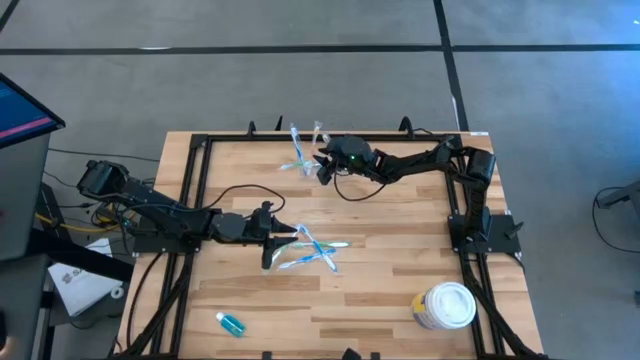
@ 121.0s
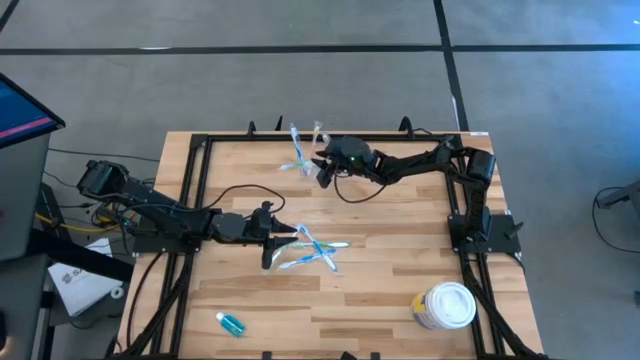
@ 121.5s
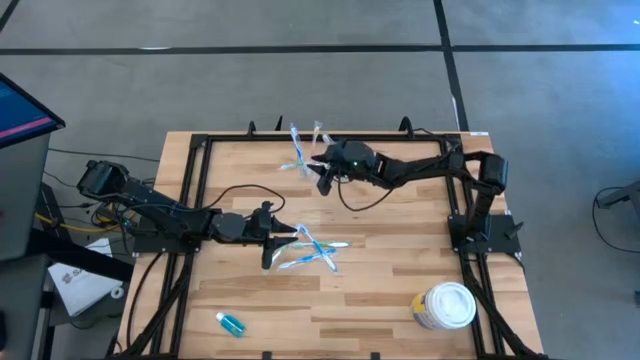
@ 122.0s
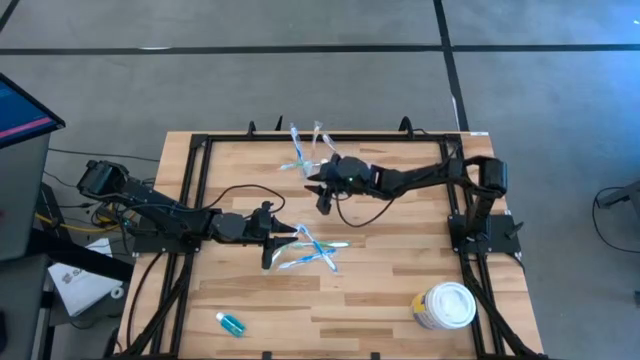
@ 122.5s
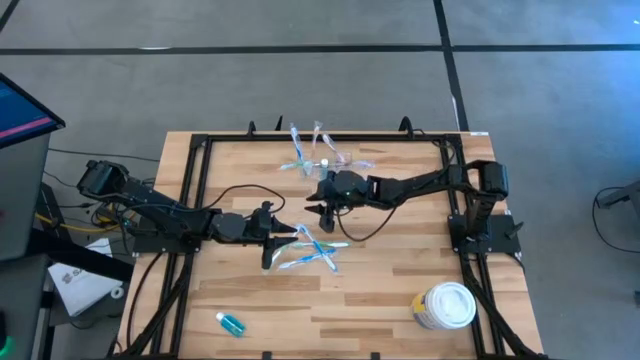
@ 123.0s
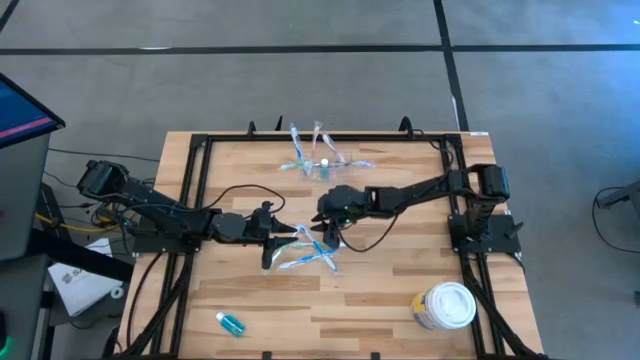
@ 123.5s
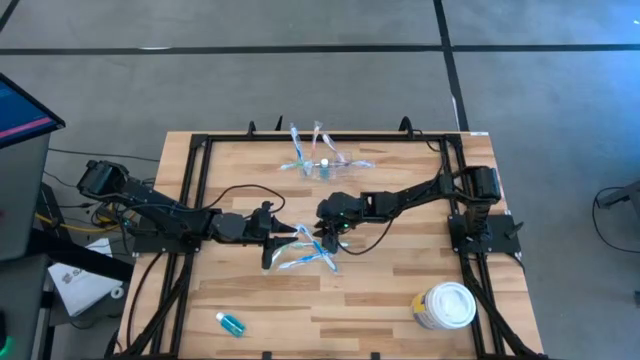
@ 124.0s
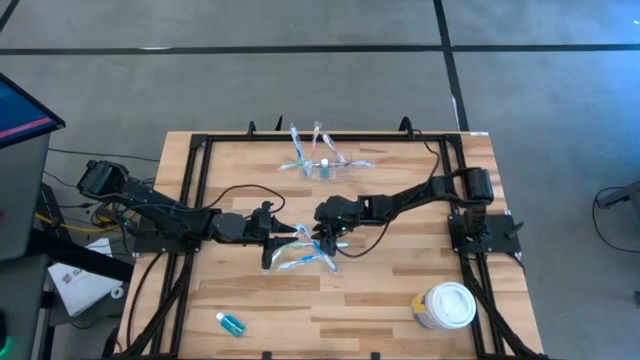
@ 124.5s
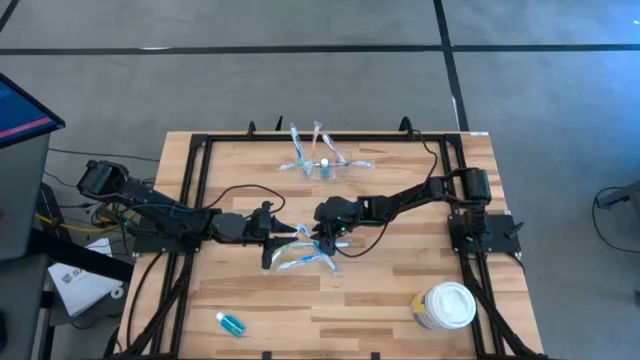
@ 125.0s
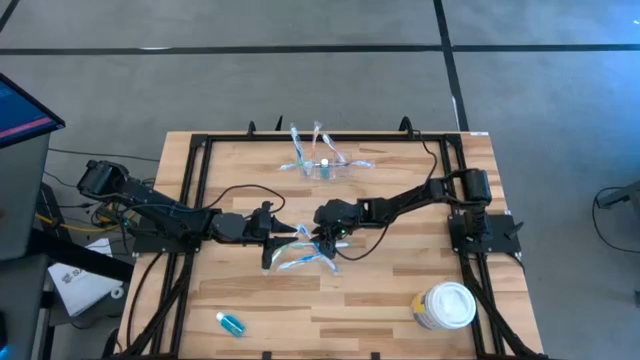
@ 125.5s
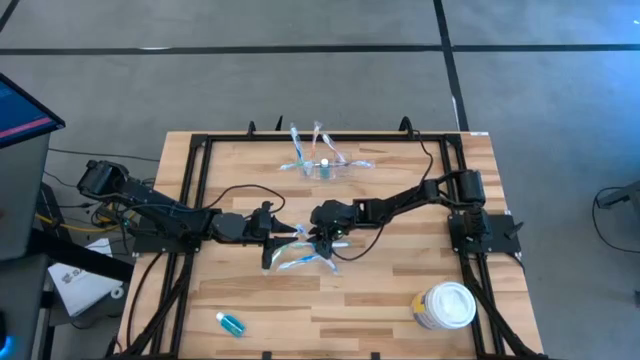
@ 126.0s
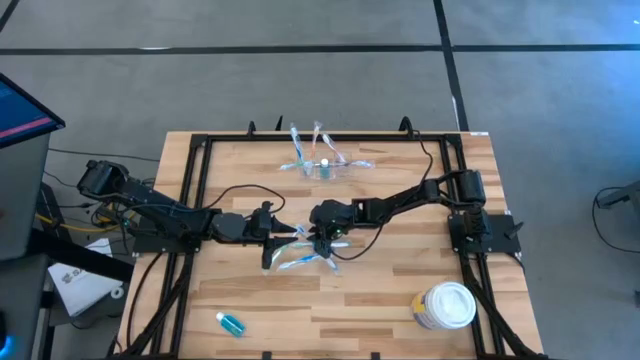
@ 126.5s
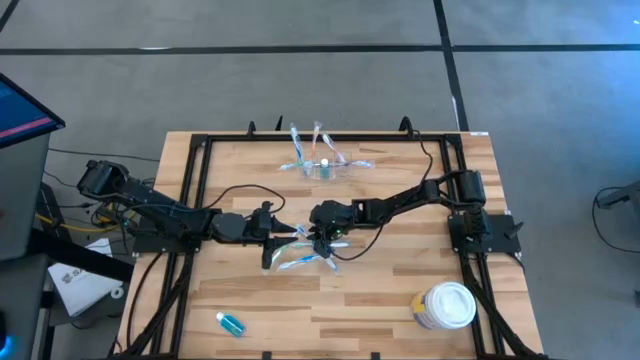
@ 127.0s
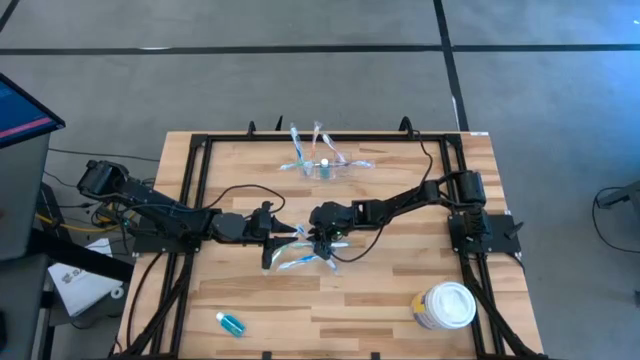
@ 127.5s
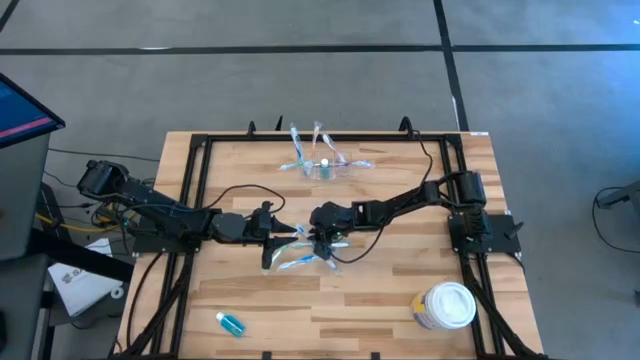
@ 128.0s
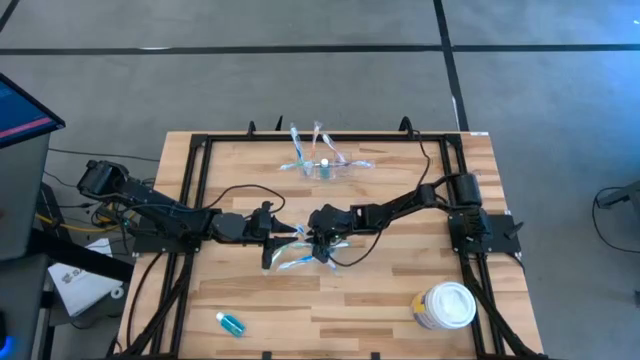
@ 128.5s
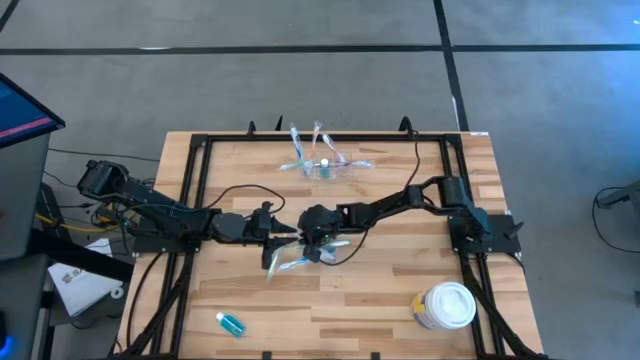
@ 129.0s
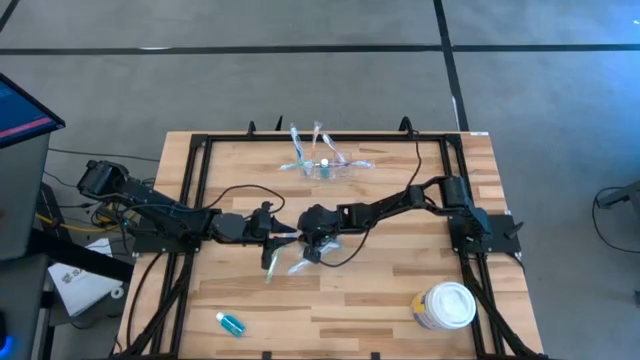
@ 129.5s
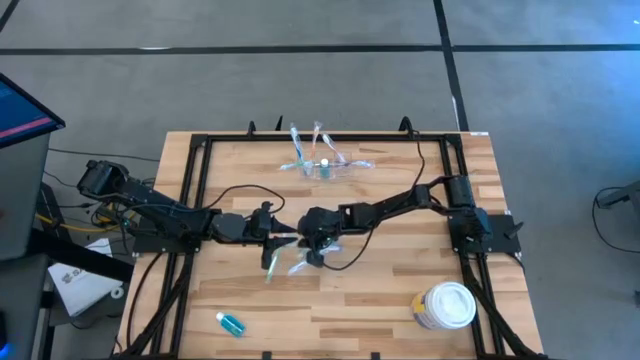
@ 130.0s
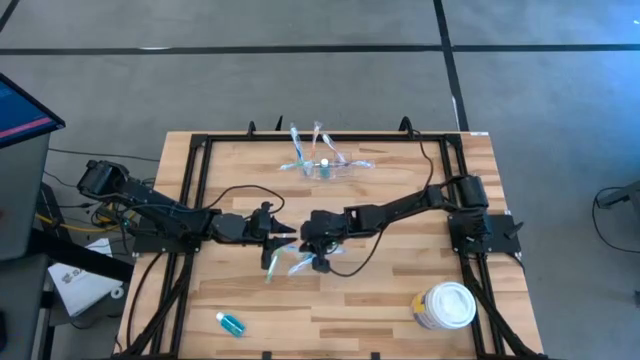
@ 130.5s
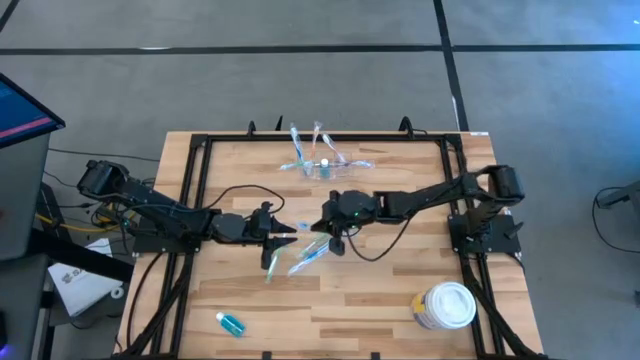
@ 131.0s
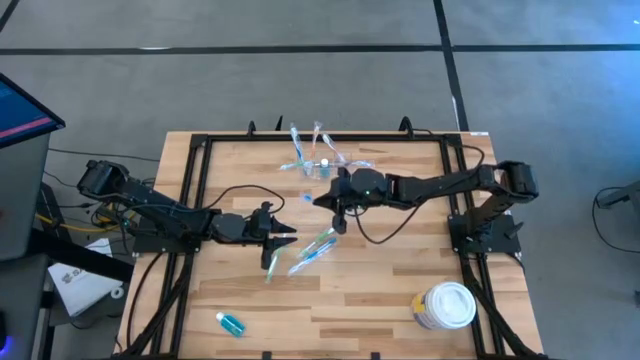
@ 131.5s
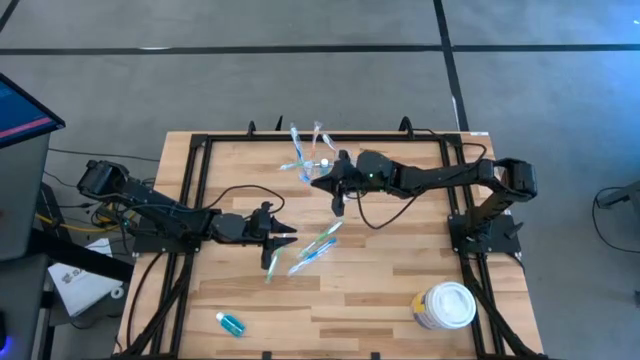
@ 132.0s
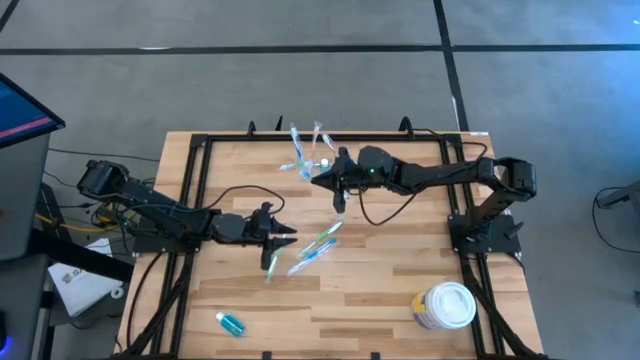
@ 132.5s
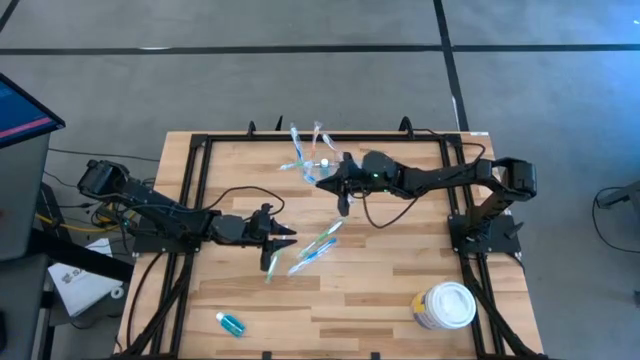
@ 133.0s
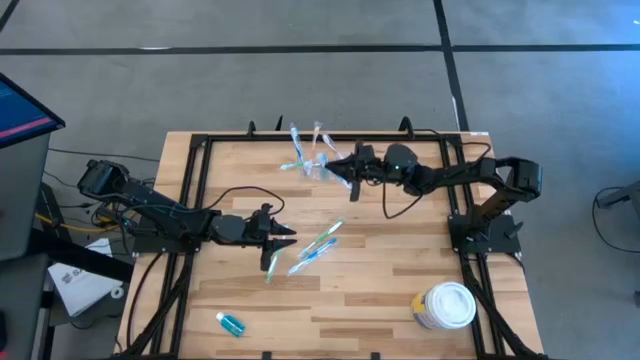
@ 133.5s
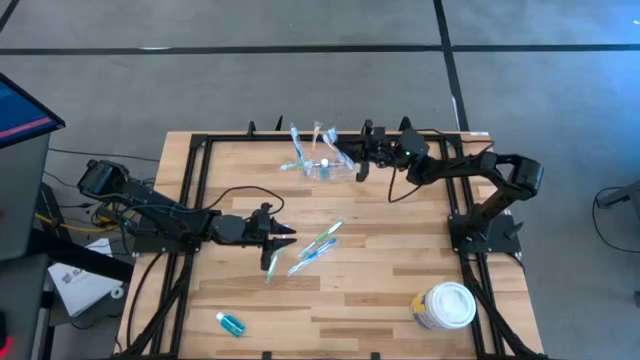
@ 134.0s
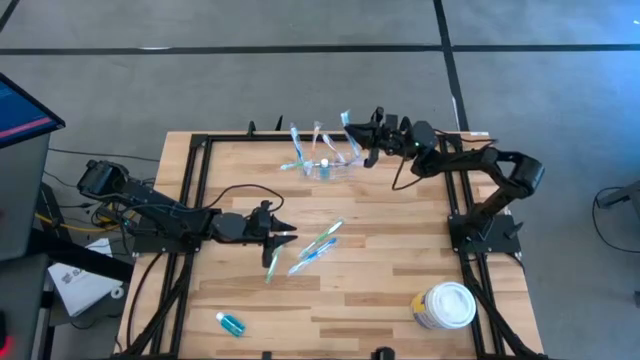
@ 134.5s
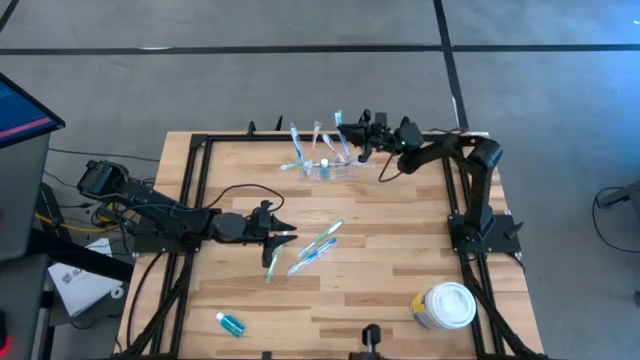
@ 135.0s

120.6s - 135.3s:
Task: Pick & Place toothbrushing station
Put the blue toothbrush into the transparent organizer

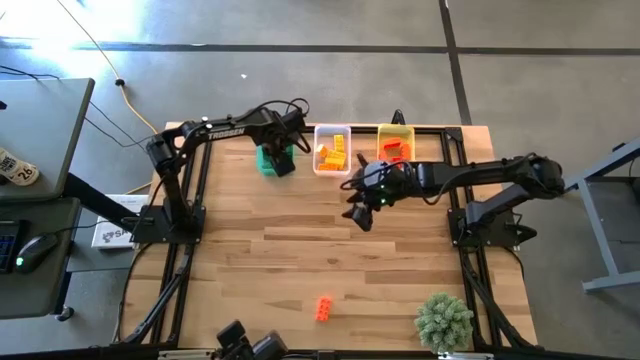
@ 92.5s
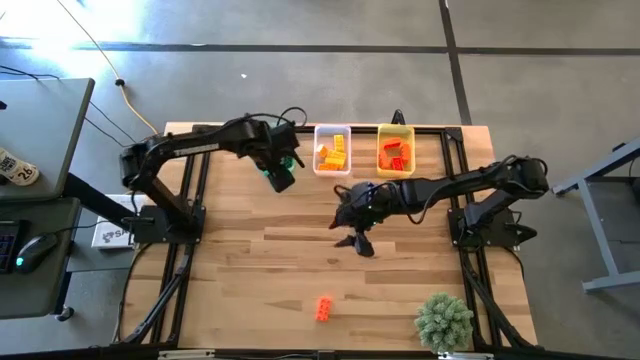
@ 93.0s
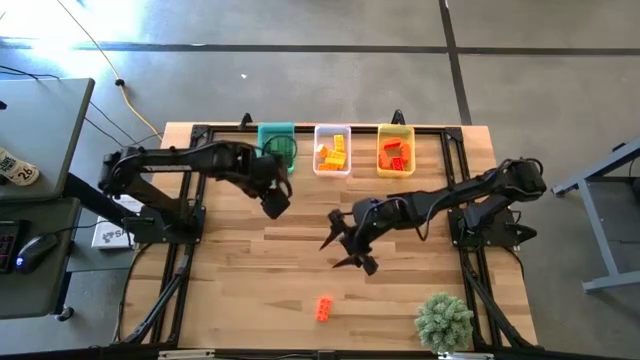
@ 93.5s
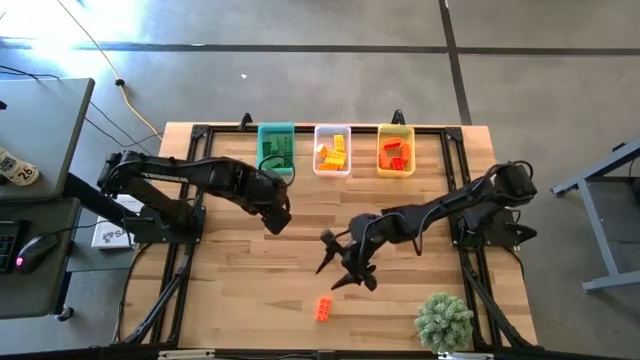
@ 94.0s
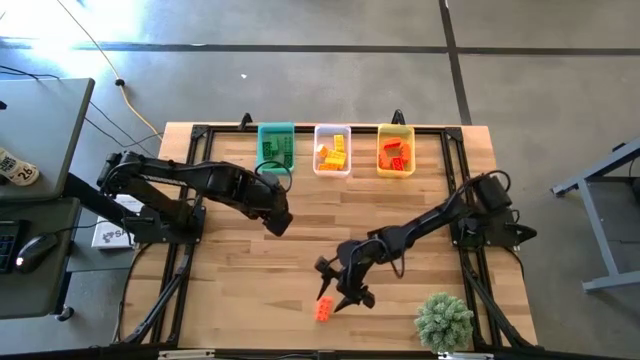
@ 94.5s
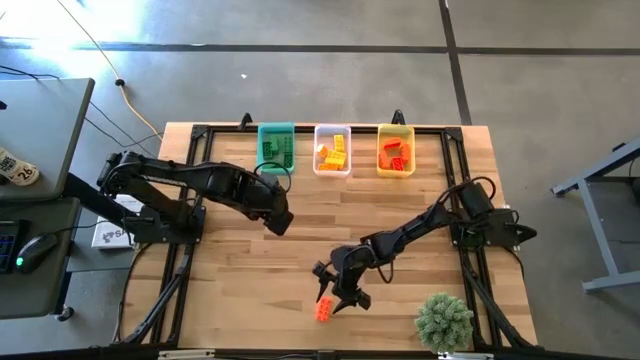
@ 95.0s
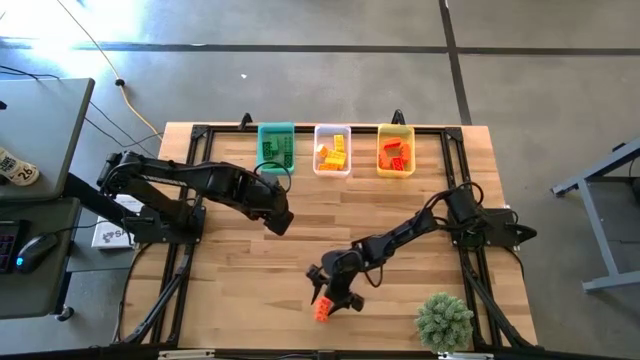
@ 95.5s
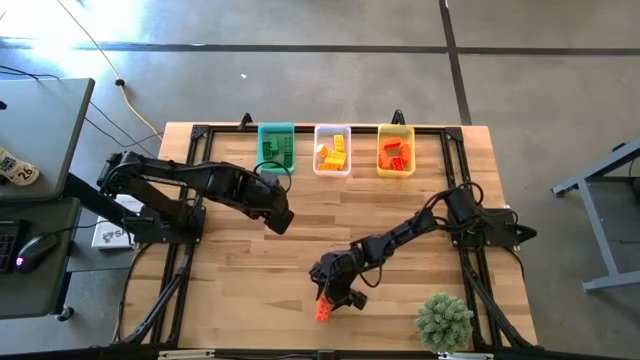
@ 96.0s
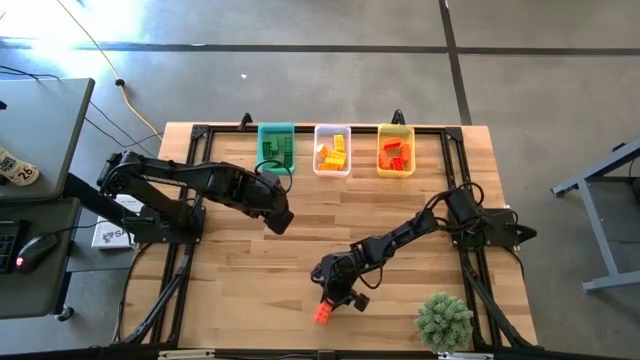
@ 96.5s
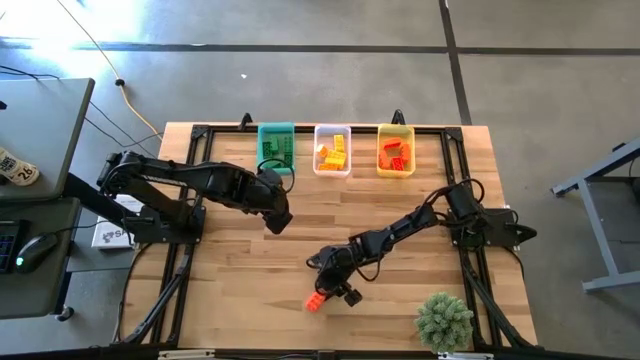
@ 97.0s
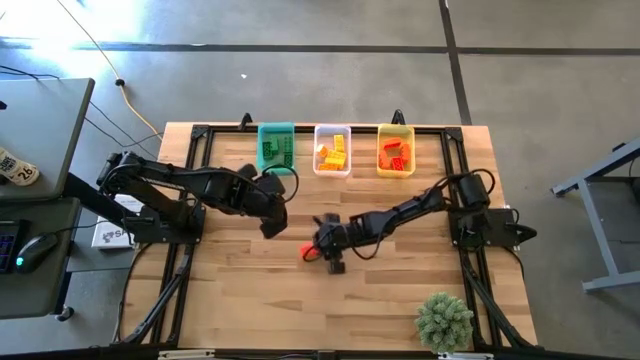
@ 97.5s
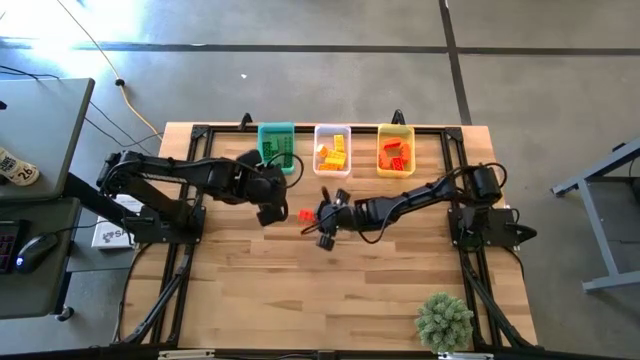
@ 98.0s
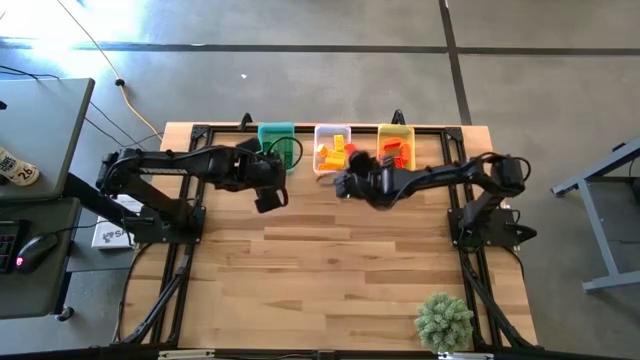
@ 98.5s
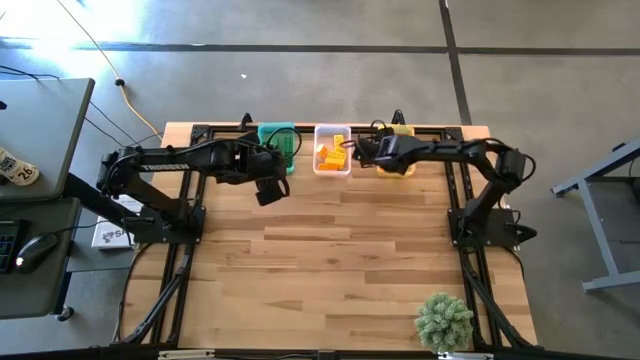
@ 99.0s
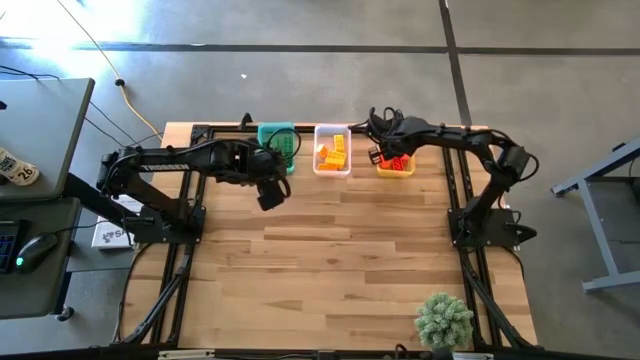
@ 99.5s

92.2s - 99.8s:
Task: Sort & place blocks by color
Put the orange game piece into the yellow bin
